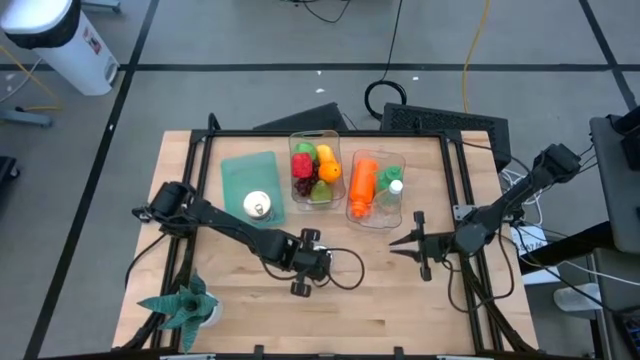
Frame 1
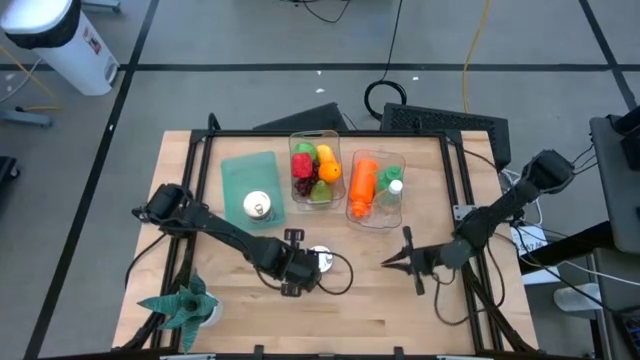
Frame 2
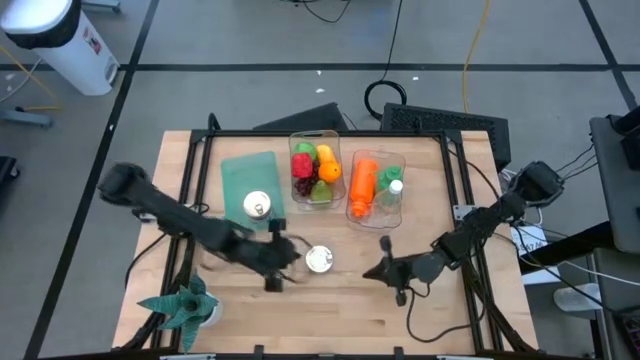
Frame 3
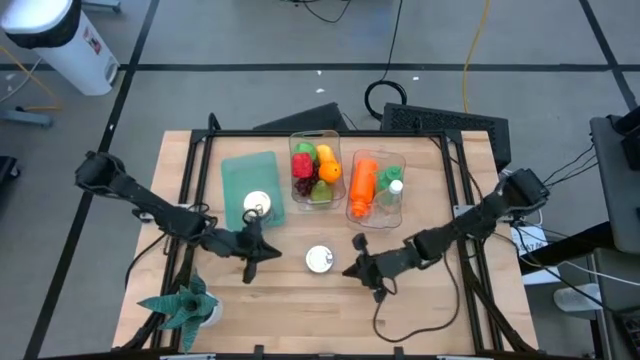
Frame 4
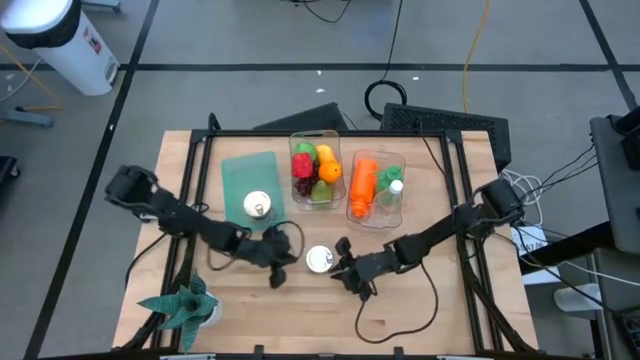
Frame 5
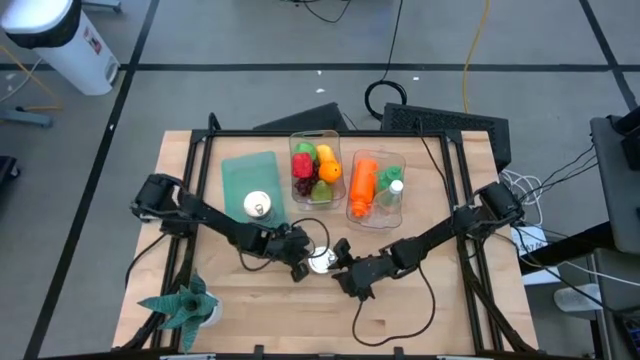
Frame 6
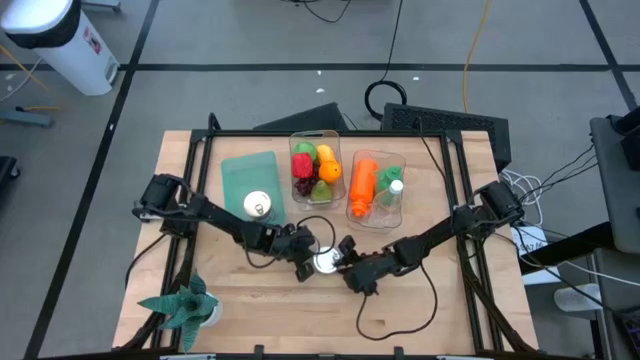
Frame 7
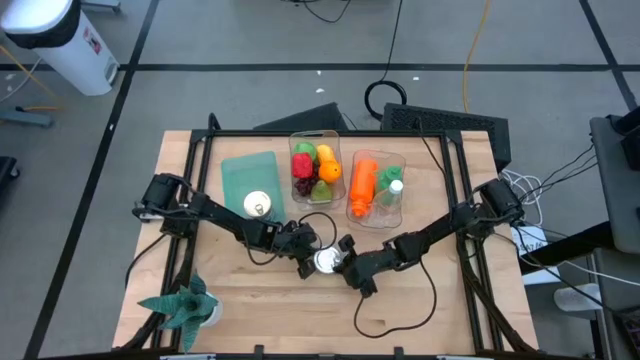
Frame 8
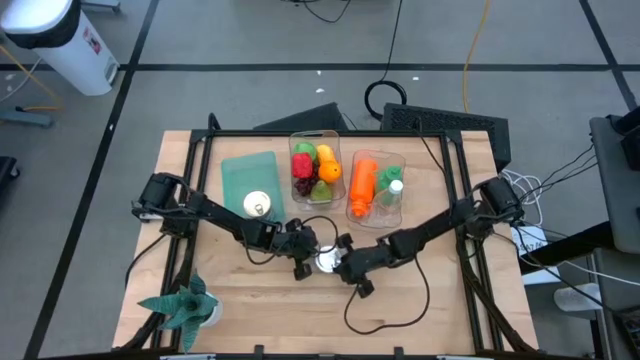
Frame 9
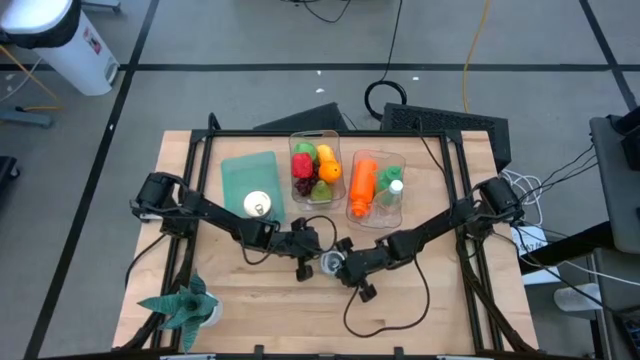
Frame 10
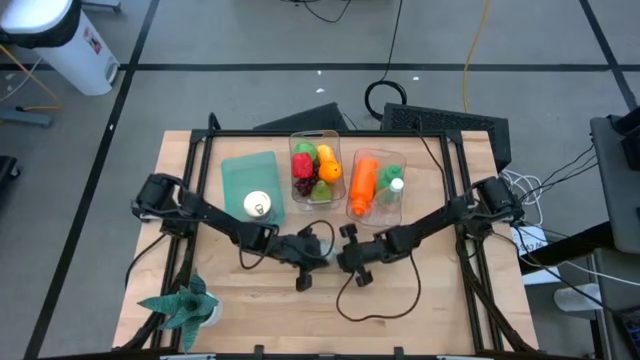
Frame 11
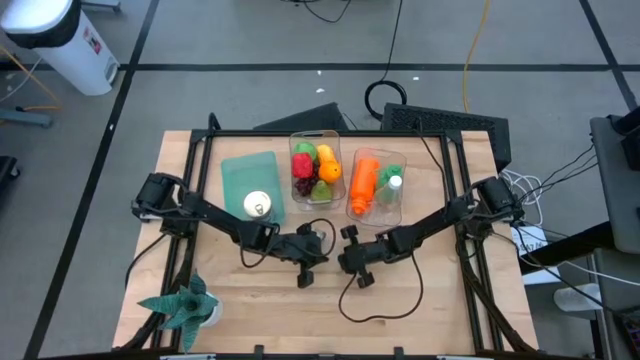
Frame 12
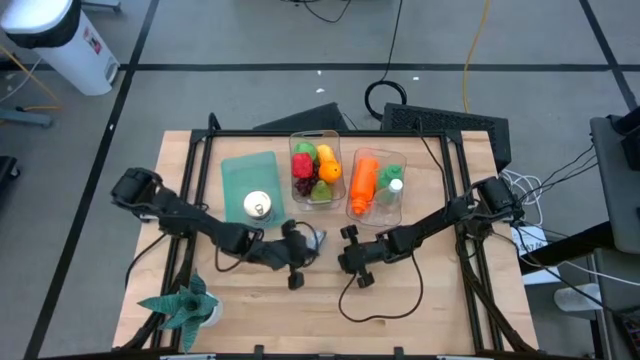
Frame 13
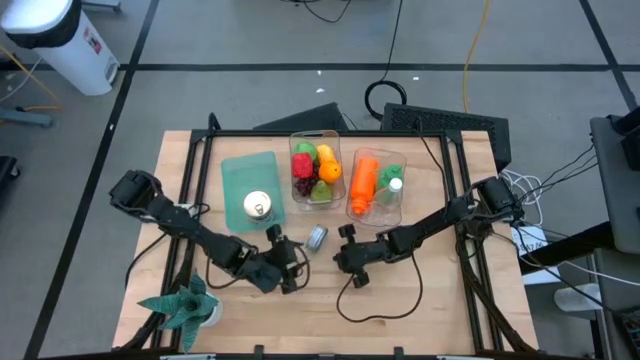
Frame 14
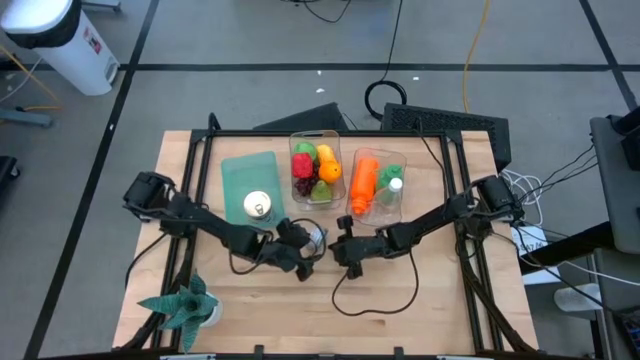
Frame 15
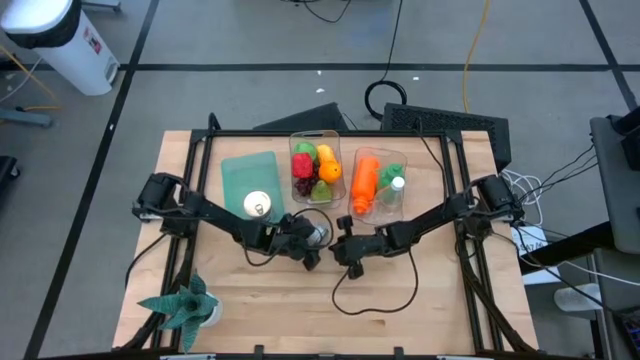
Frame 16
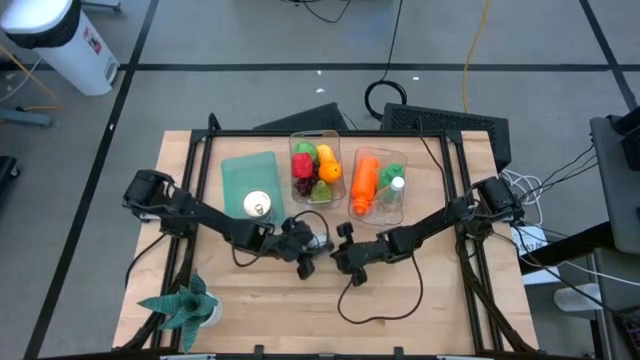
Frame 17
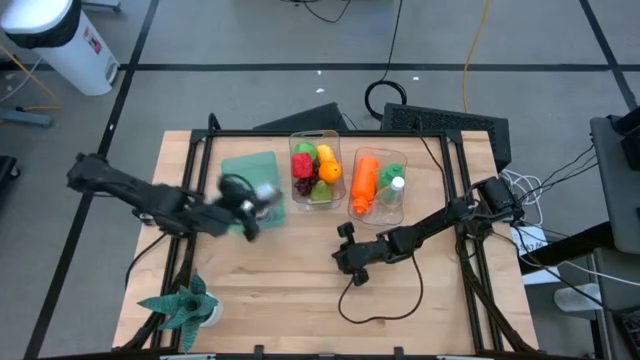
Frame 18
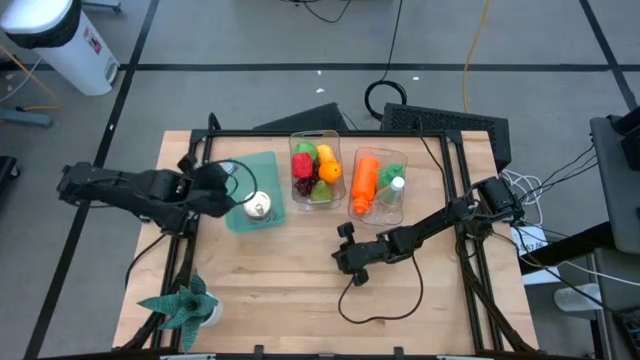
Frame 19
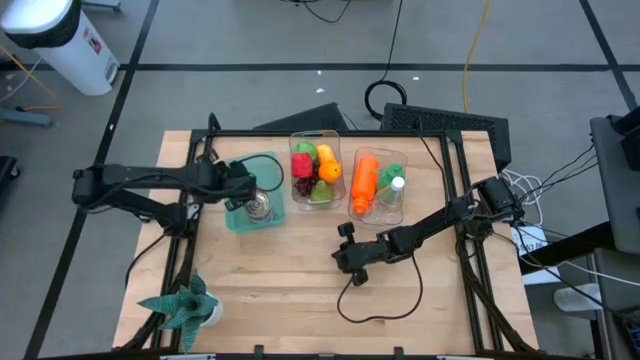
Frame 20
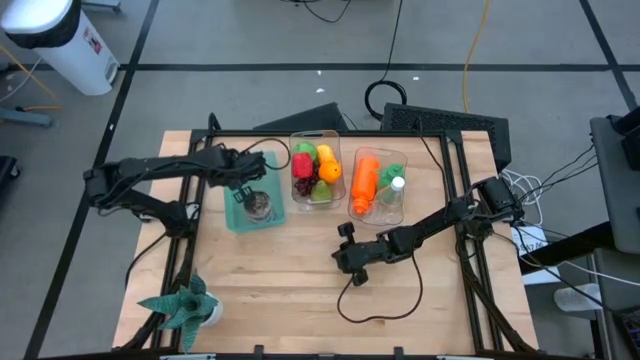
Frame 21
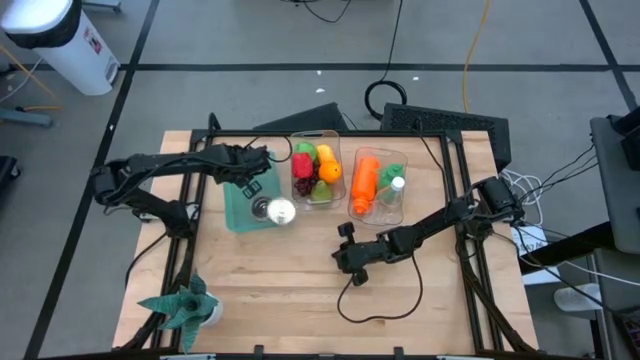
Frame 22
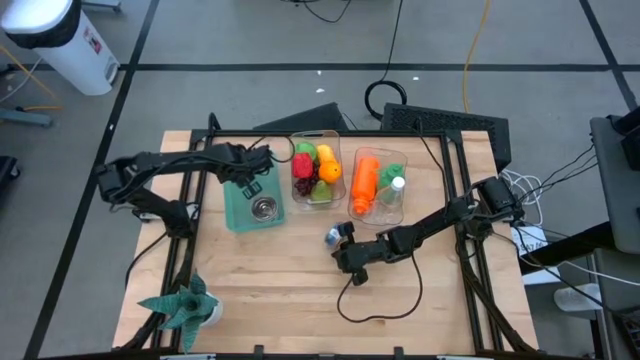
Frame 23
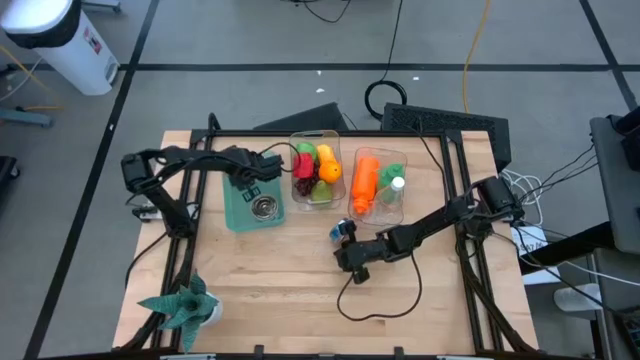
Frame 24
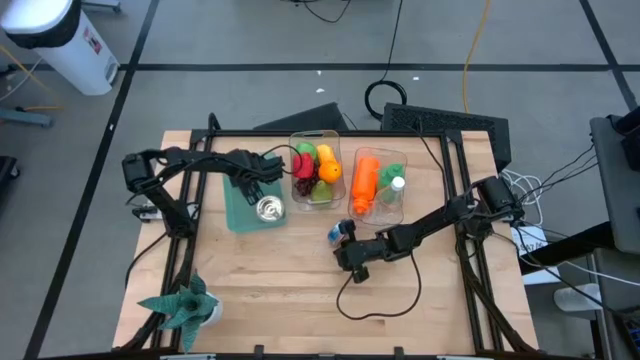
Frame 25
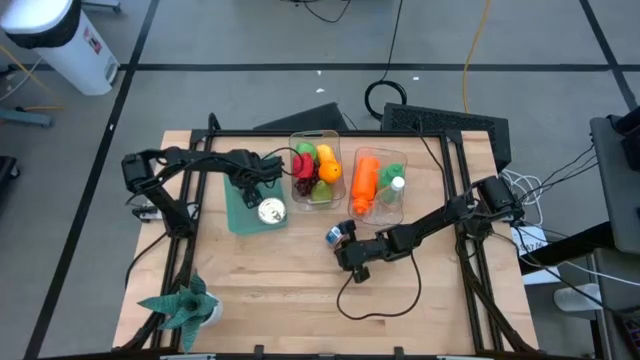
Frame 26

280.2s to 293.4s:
Task: Pick & Place Food Item
Put the green tuna can into the green bin

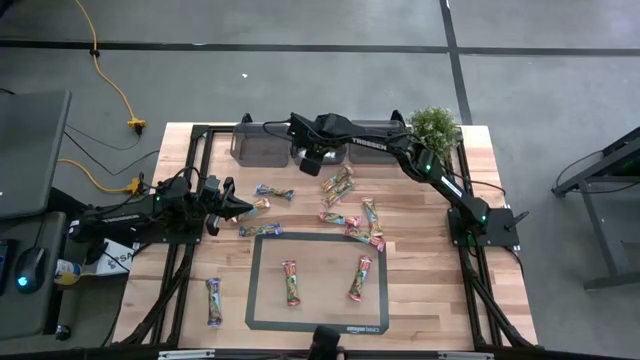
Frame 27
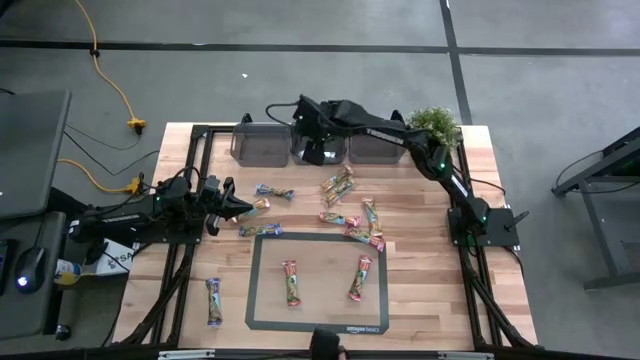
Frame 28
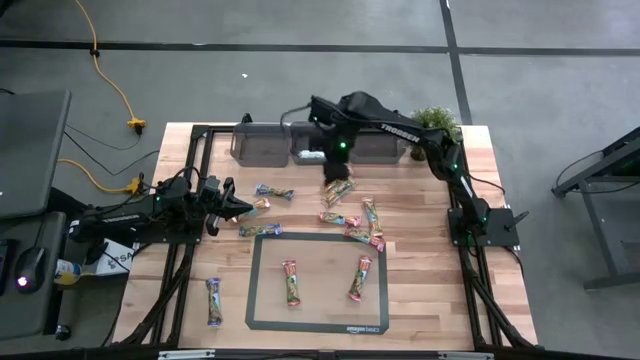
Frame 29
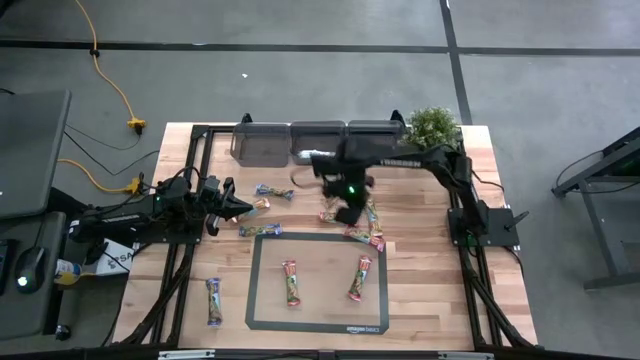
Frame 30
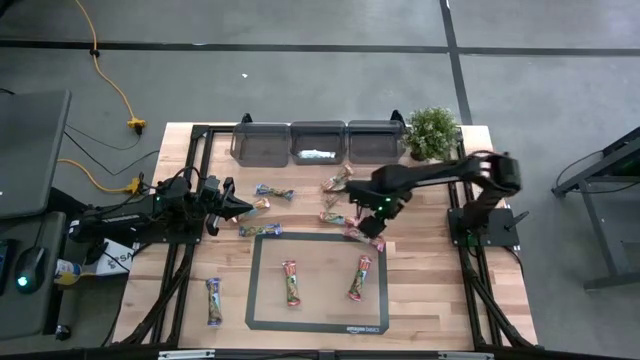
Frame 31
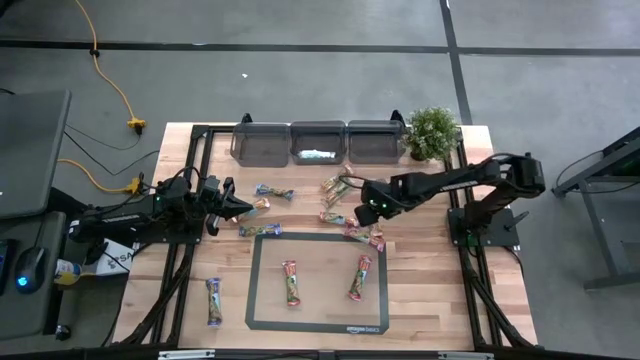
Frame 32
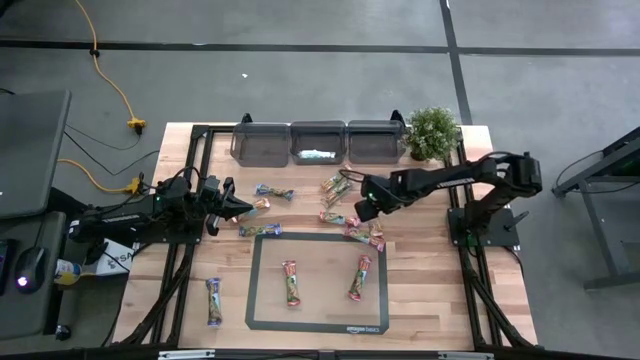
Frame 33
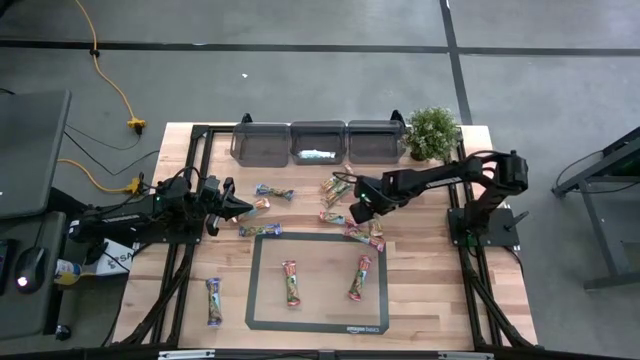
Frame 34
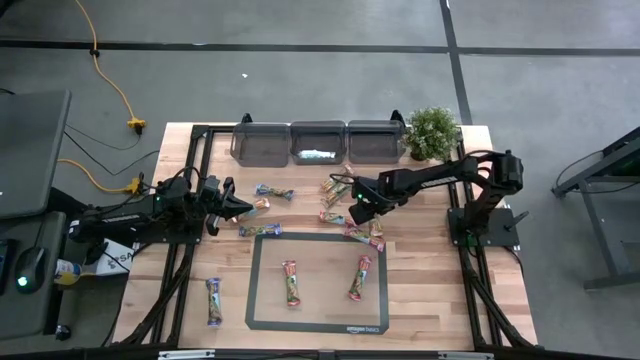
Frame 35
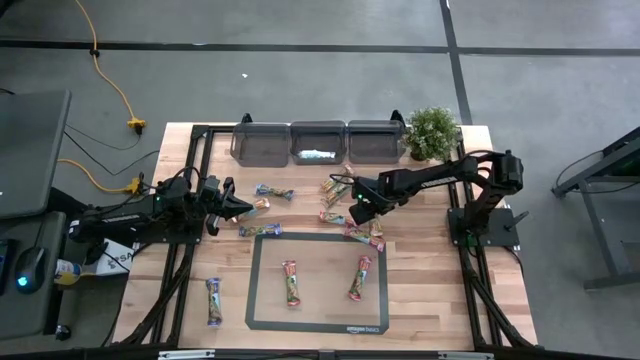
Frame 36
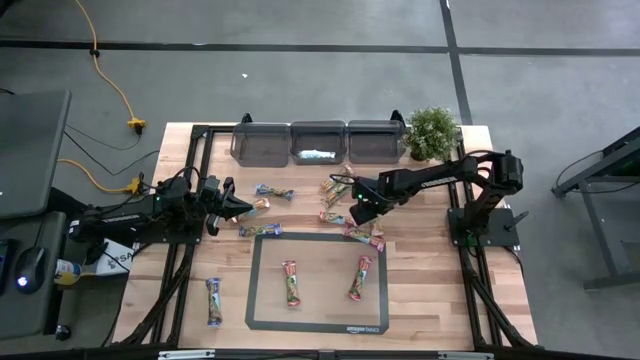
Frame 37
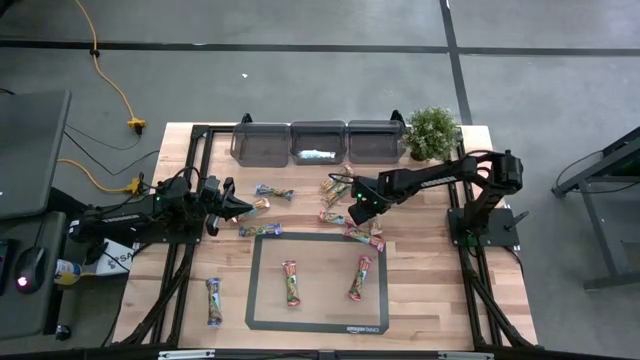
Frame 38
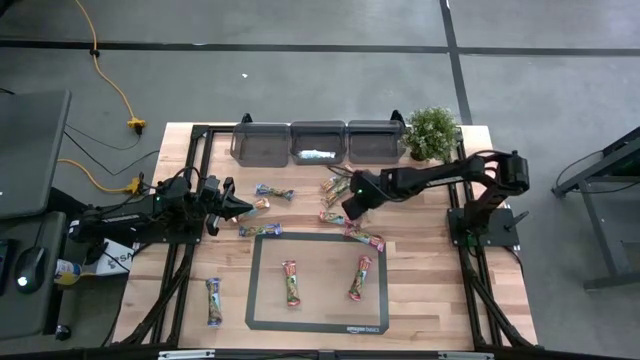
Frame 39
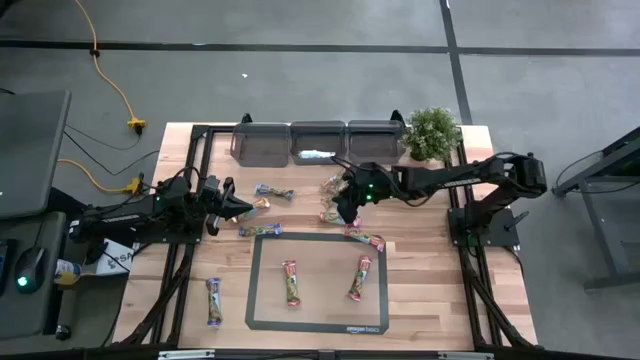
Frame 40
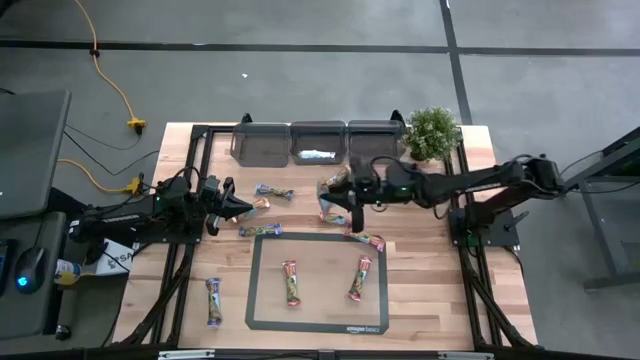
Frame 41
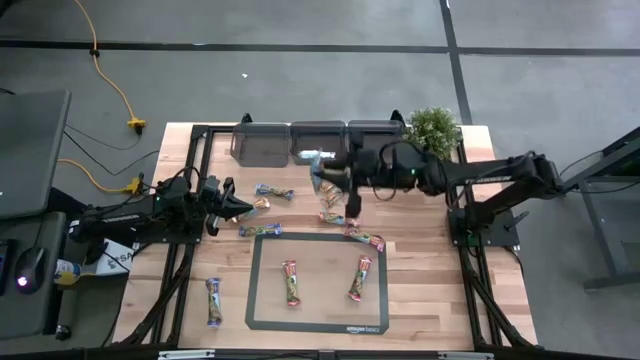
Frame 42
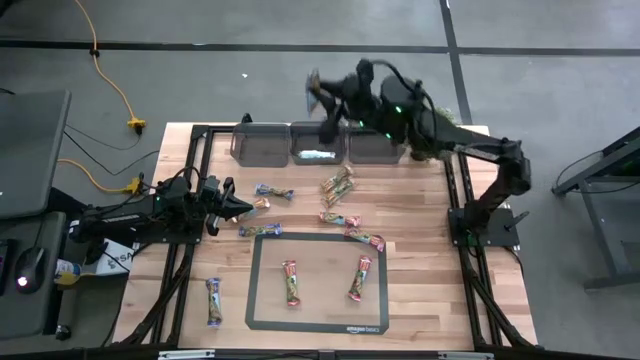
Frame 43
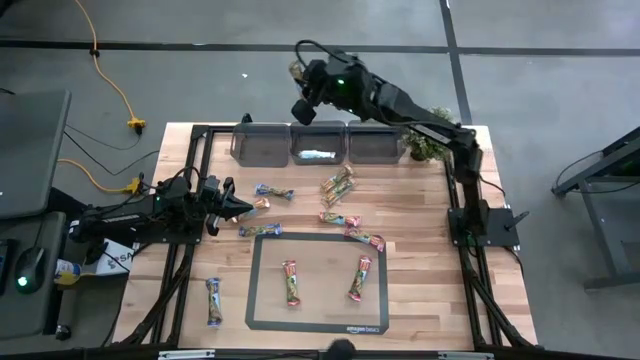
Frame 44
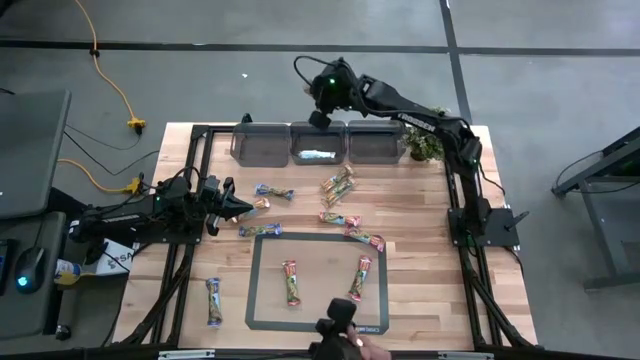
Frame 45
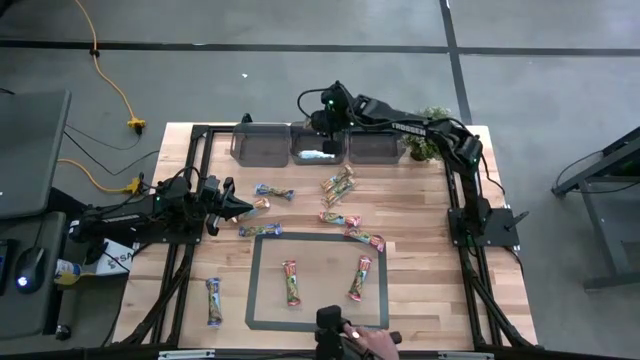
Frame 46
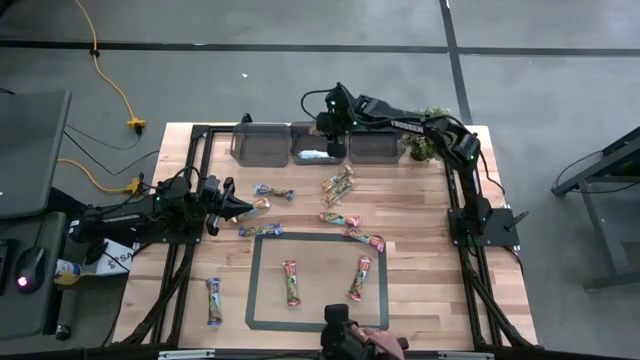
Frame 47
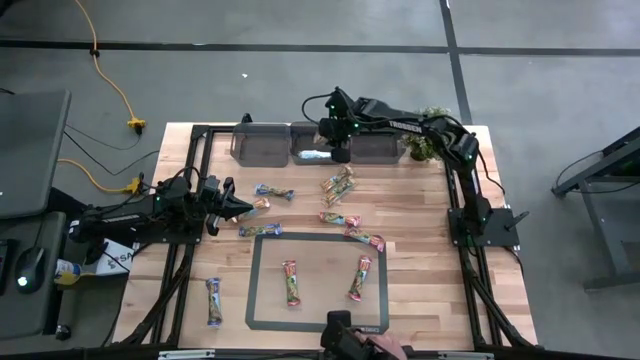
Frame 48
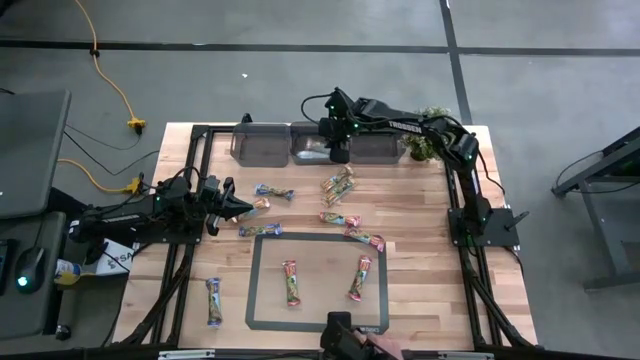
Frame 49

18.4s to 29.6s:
Task: Pick and place Granola Bars by type
Put the yellow granola bar into the middle black bin
